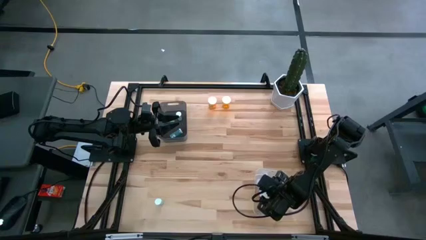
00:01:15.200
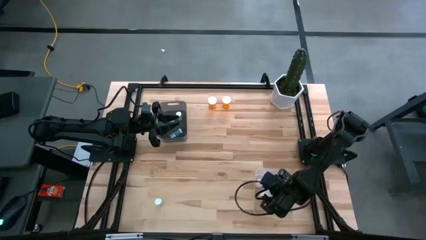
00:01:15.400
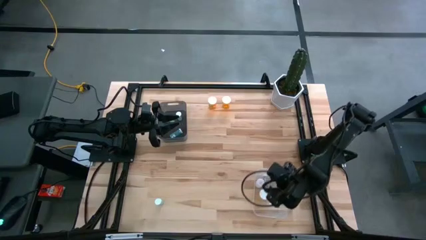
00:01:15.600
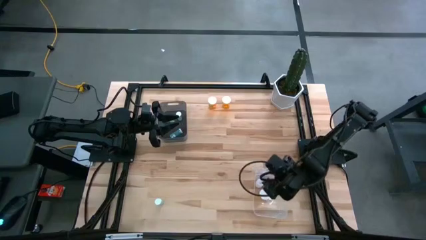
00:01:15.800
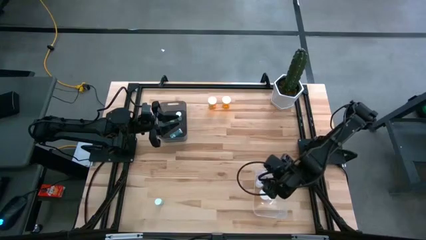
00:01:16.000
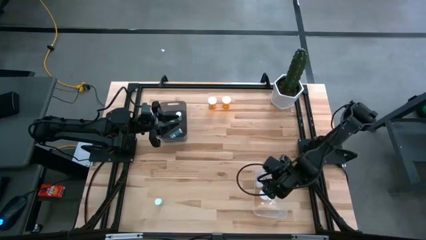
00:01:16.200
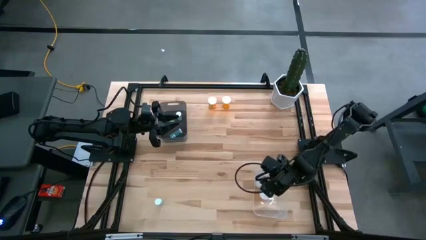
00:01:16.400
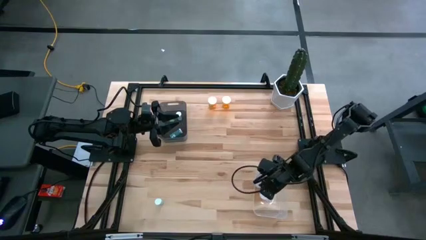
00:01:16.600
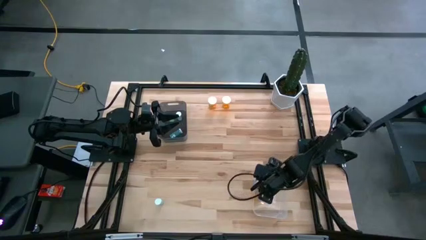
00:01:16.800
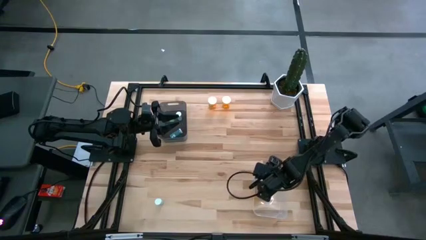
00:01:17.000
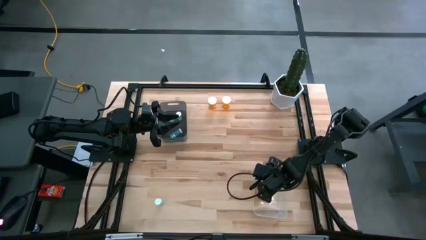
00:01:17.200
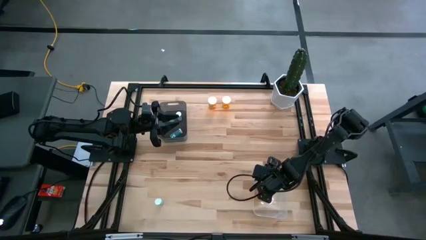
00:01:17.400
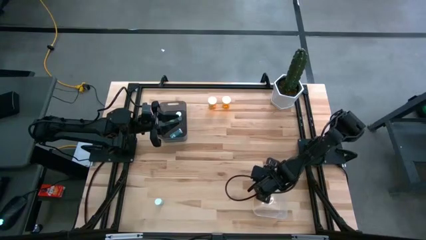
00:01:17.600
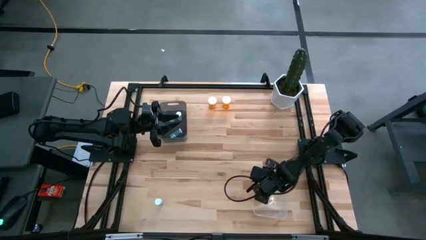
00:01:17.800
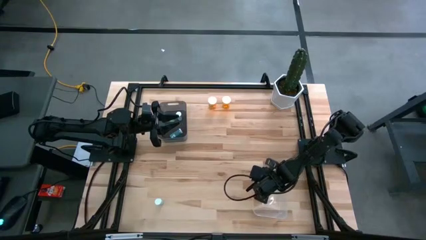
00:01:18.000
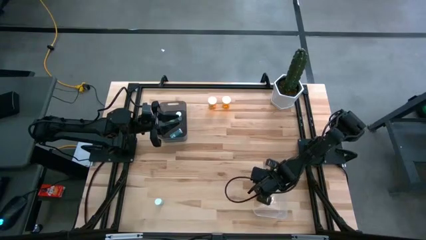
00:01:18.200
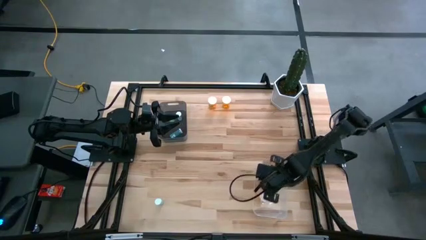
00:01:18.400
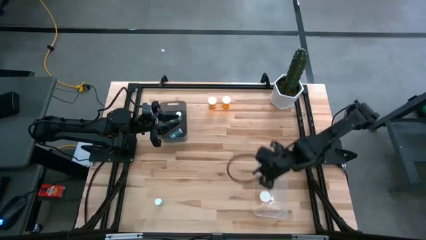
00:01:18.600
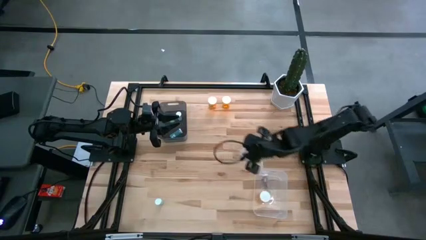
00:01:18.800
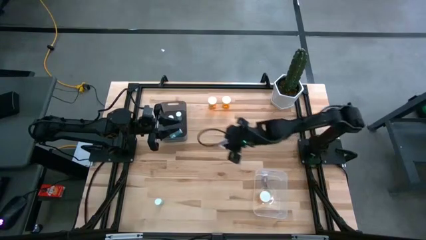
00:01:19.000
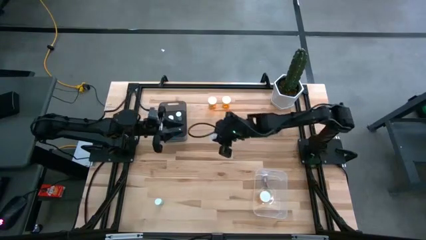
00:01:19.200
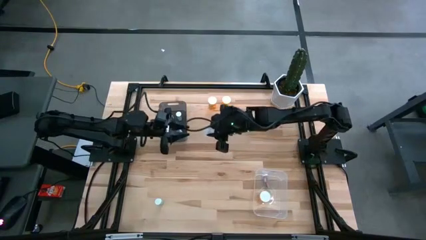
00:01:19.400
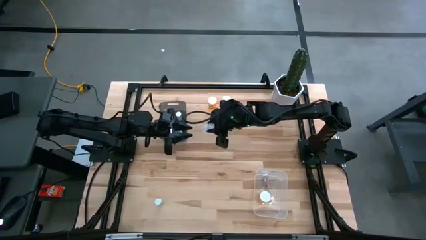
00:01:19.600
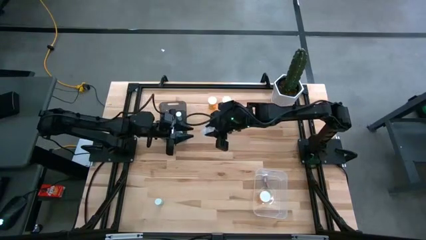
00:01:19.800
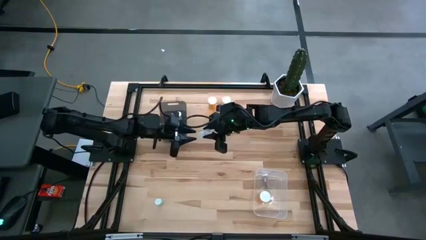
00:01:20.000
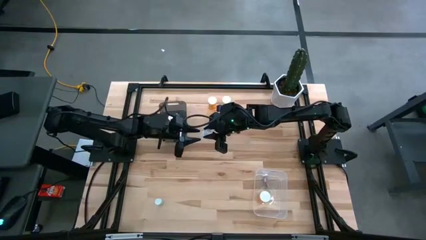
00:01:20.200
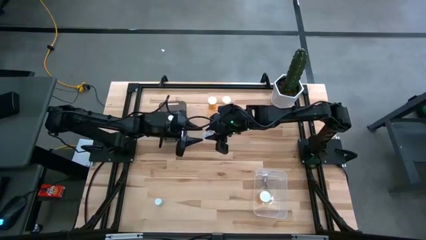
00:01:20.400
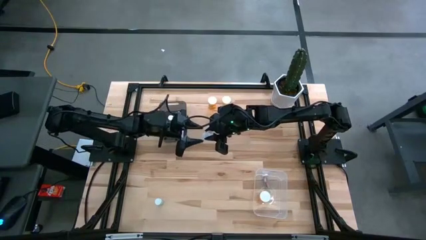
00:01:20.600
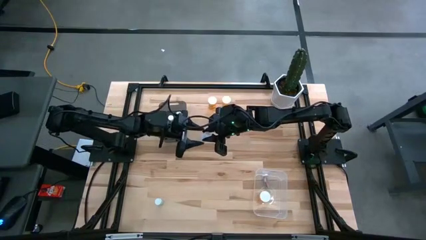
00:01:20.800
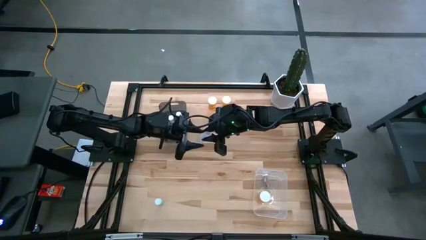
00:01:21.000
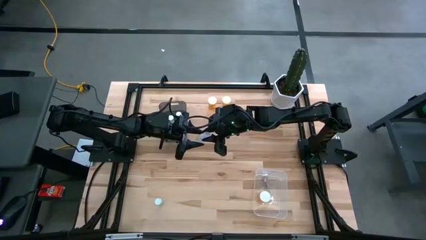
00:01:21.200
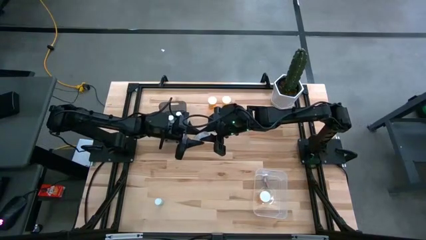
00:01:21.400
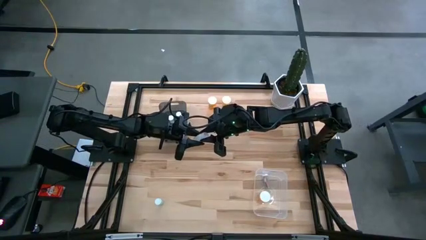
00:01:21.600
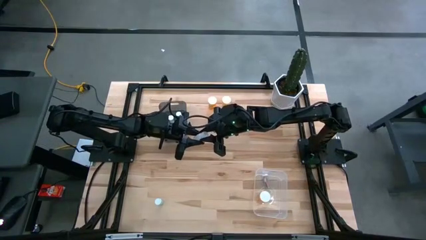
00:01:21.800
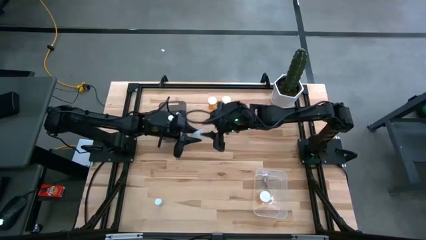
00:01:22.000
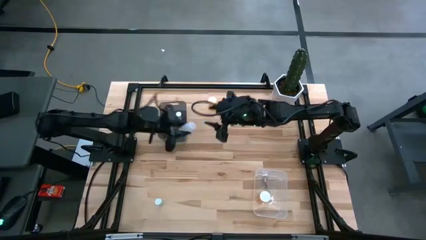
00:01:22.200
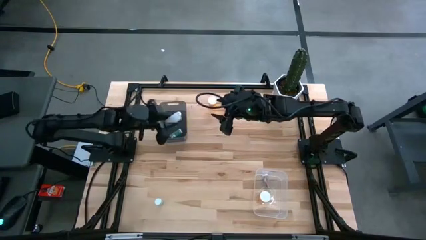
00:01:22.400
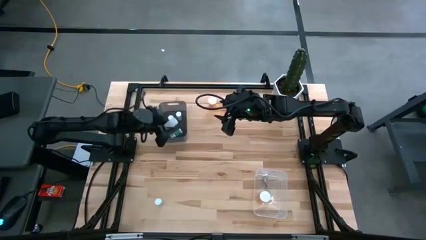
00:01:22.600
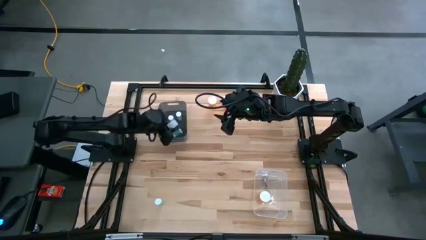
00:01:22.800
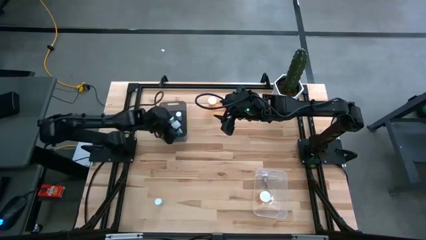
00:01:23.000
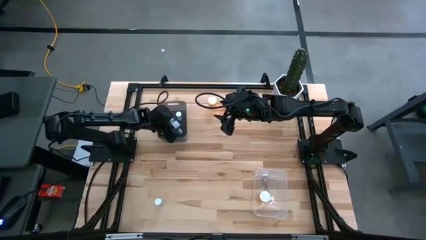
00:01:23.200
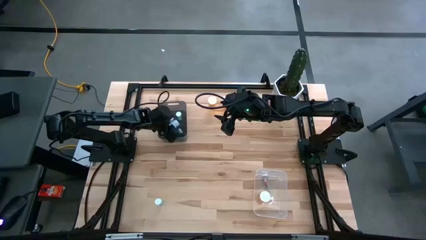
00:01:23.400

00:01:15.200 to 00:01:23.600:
Task: Pick and place medicine bottles into bin by pill shape (circle, oval)
Remove the small white medicine bottle into the transparent bin and place it into the black bin

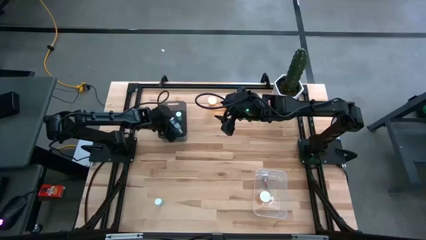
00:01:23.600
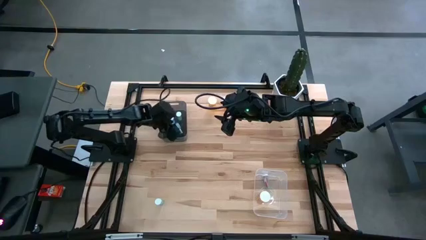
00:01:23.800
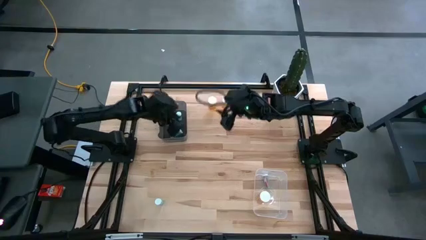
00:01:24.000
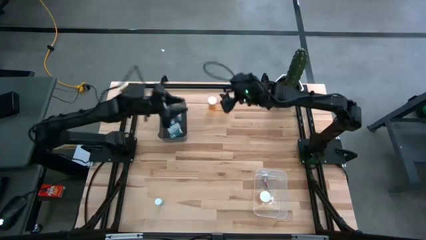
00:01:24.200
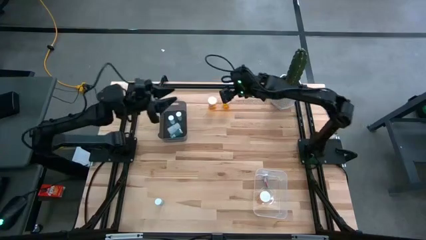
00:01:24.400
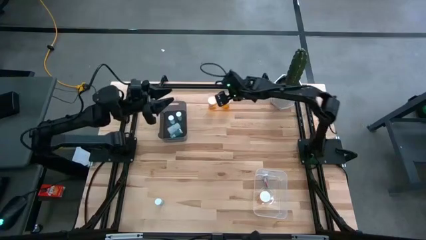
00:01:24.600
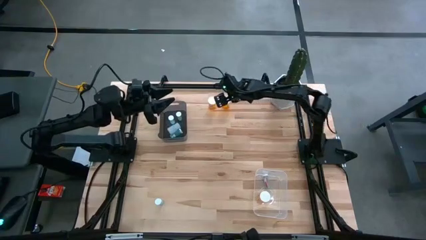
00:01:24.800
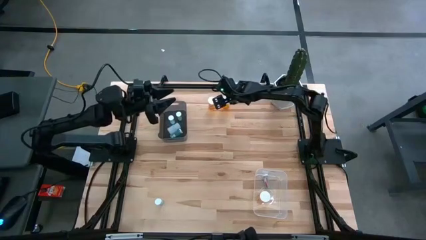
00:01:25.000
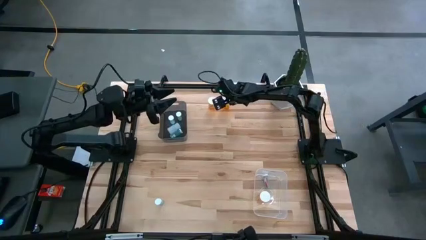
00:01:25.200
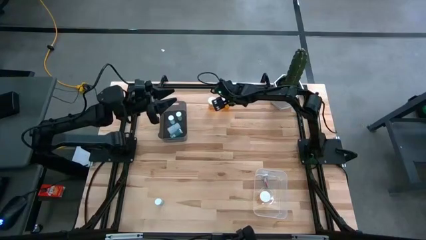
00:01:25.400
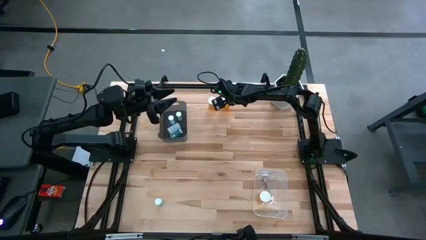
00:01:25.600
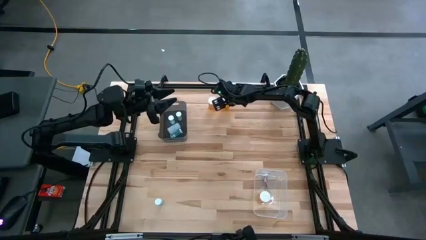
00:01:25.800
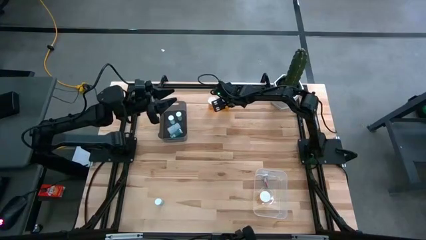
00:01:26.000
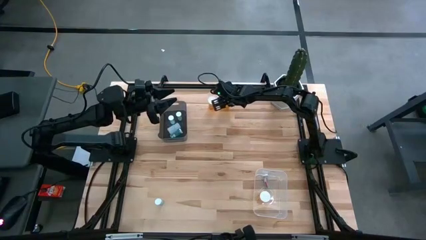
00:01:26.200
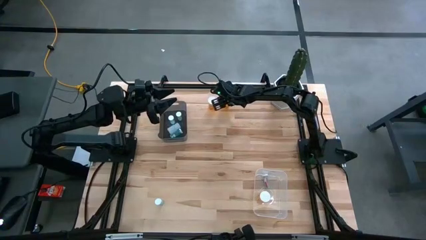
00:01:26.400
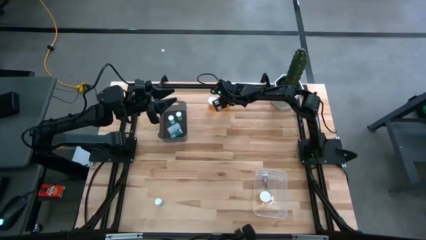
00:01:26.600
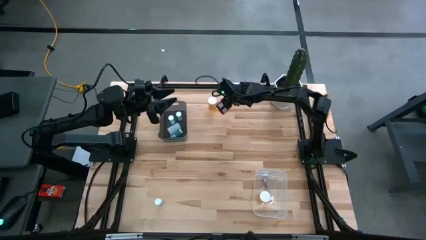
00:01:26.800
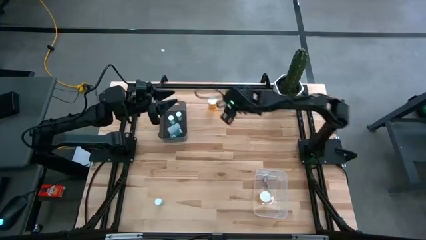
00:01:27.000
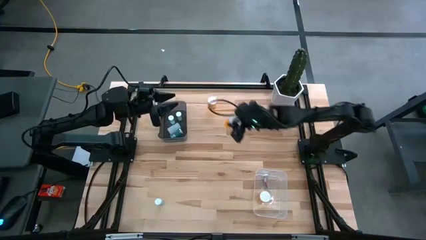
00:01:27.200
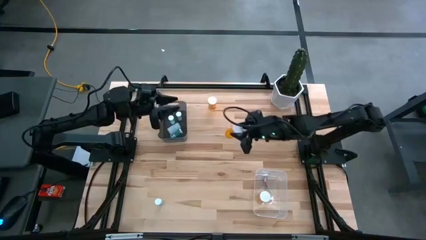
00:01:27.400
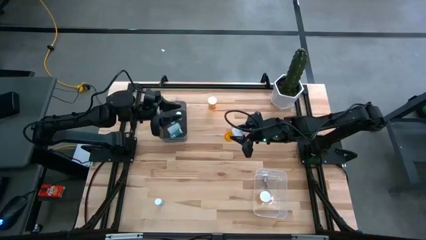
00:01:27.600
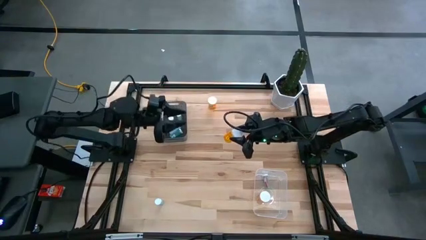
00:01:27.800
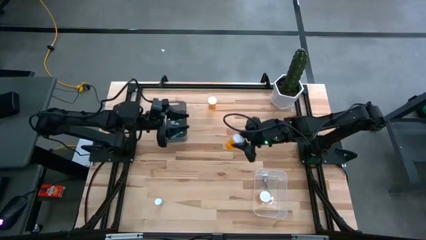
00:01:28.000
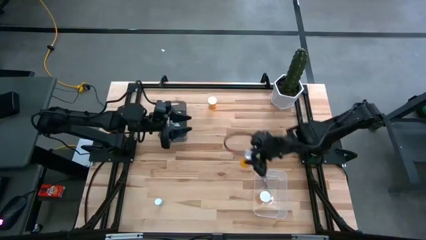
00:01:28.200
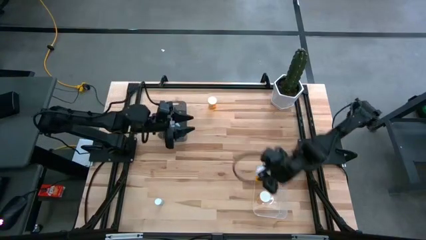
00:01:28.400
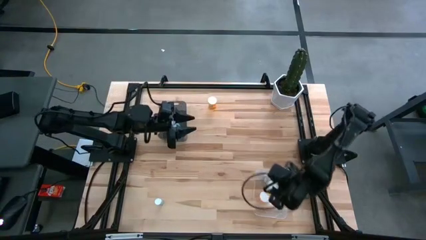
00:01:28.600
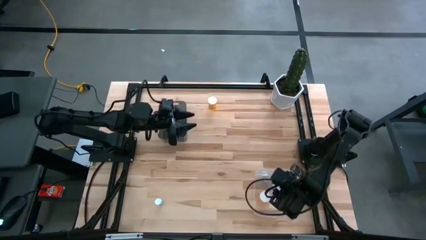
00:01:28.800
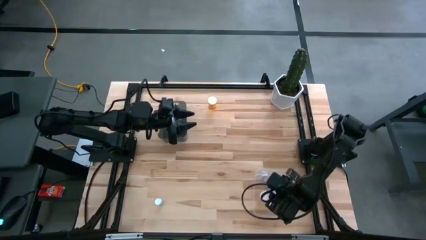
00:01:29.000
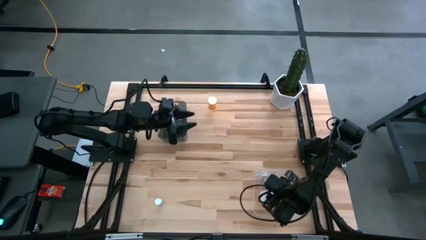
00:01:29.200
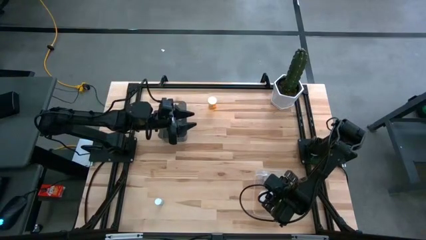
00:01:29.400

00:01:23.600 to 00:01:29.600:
Put the large orange medicine bottle into the transparent bin
